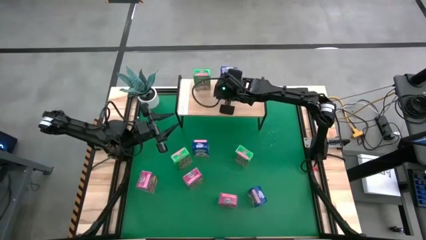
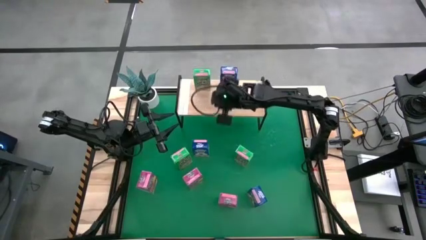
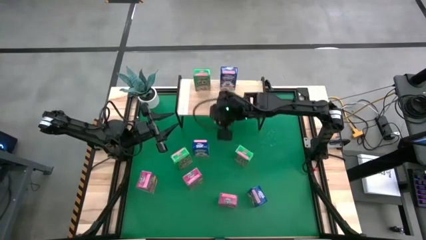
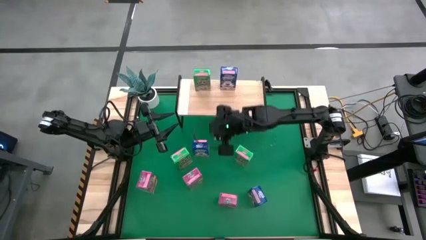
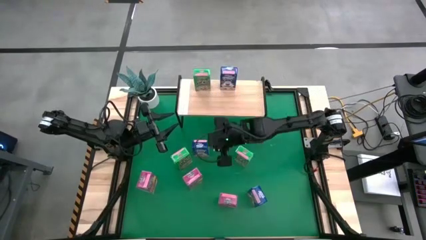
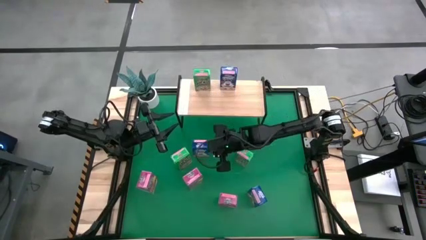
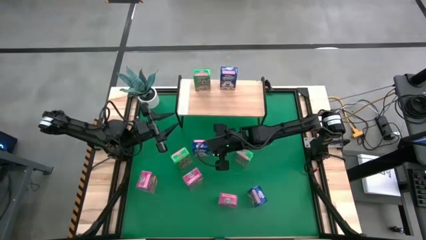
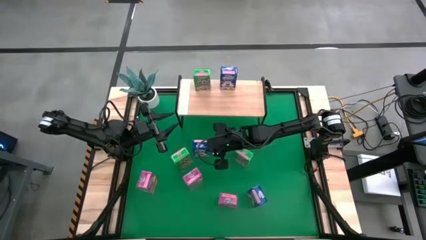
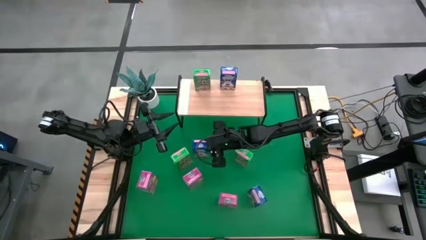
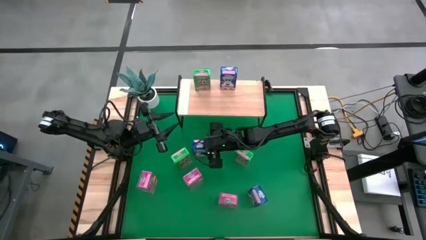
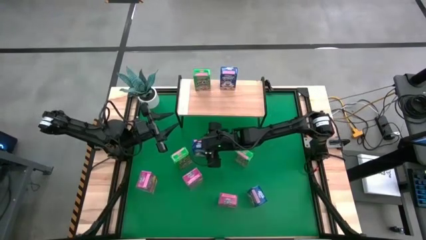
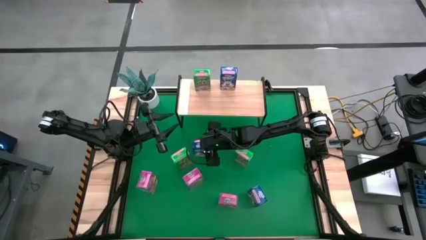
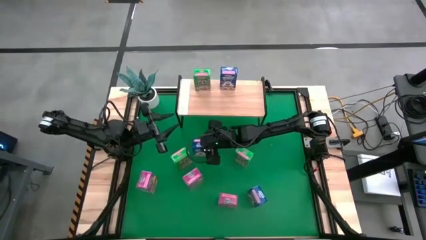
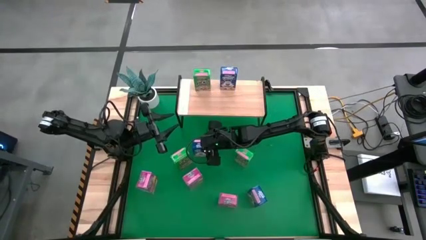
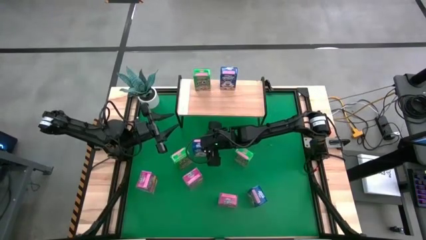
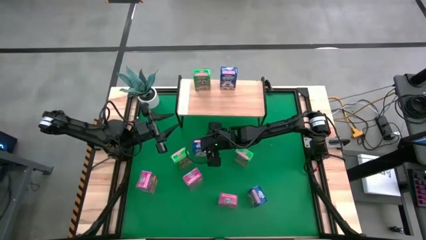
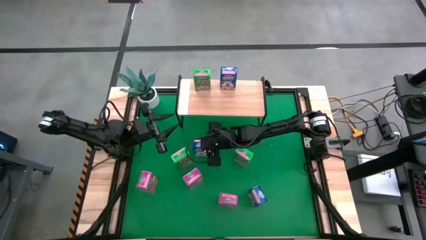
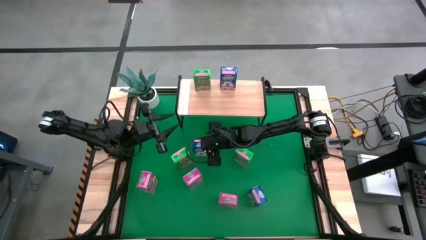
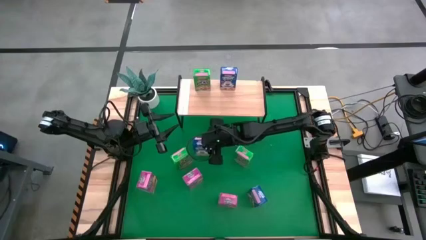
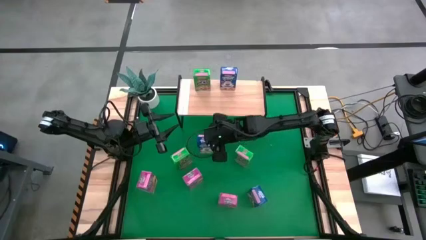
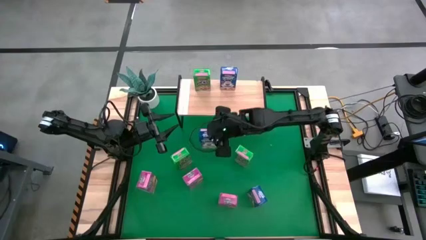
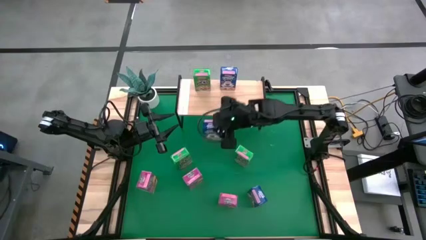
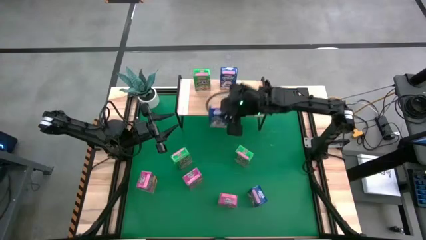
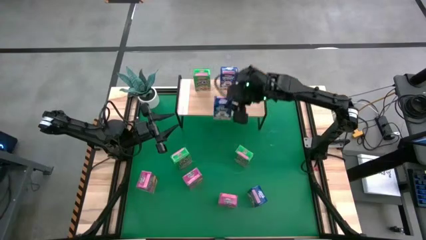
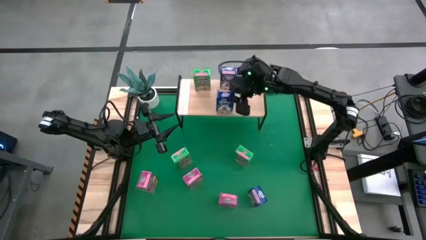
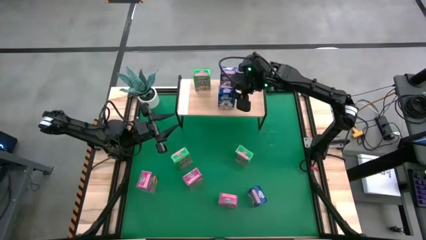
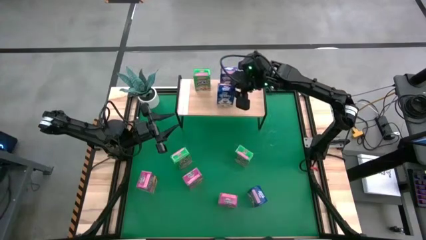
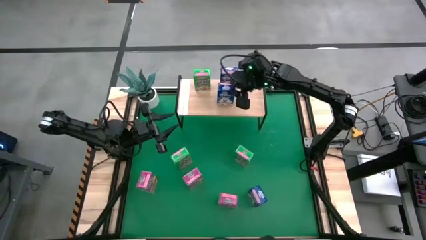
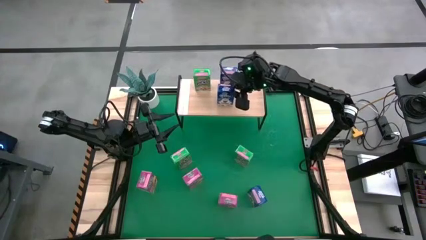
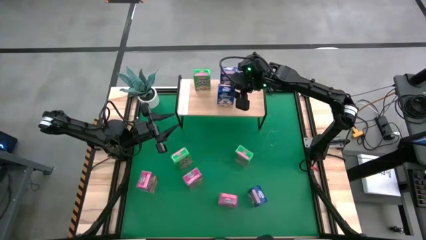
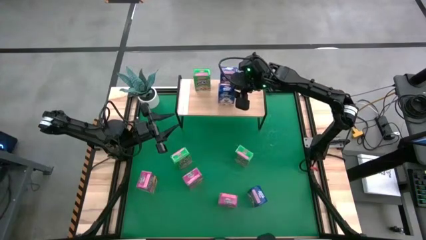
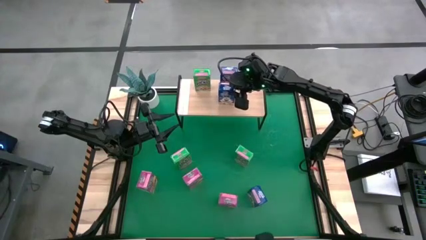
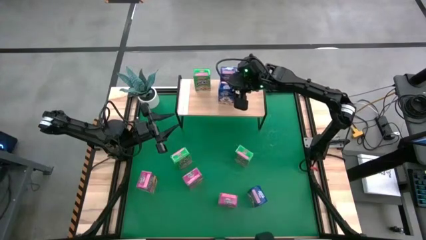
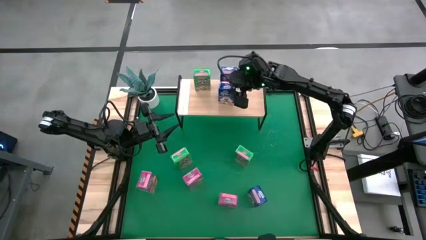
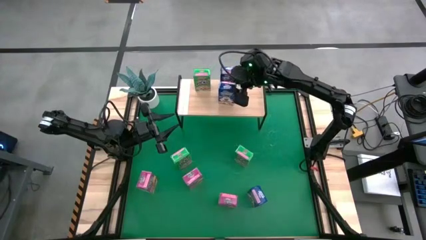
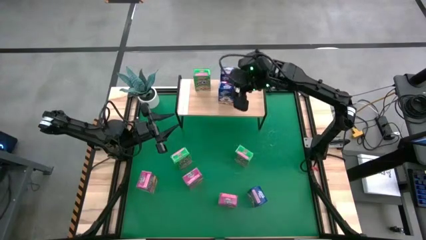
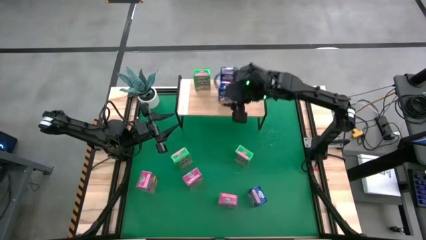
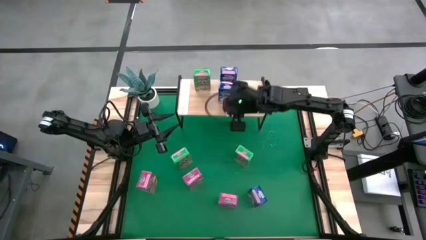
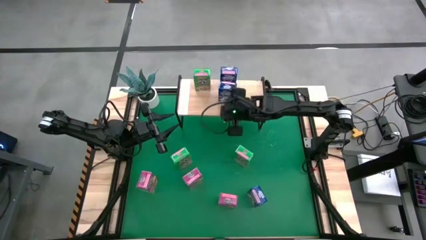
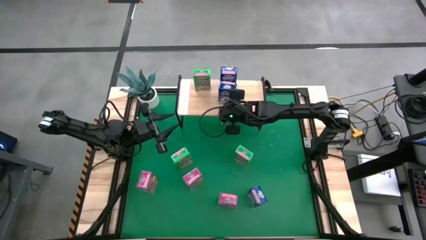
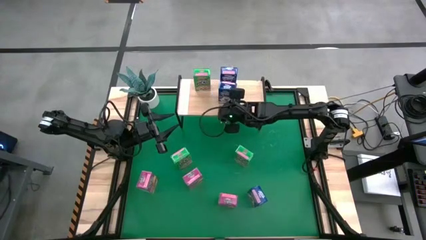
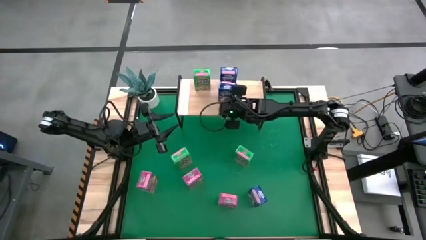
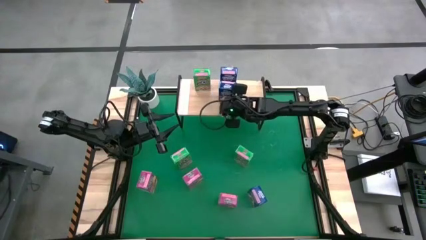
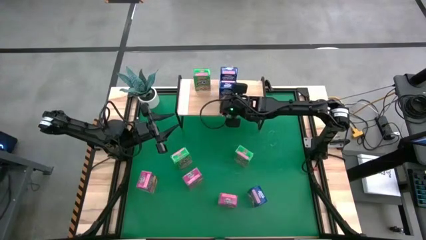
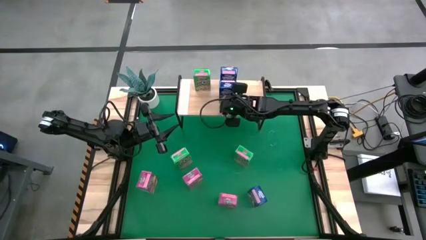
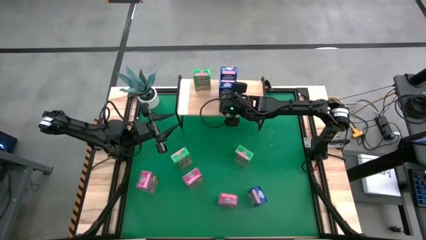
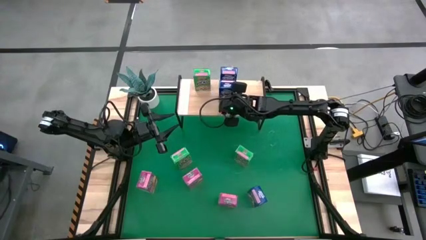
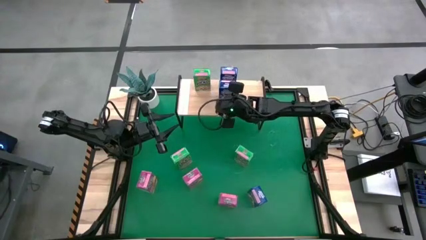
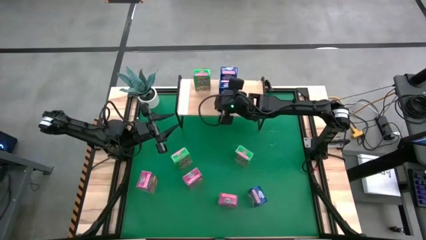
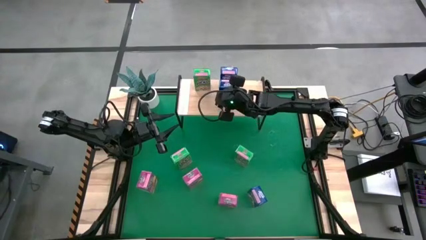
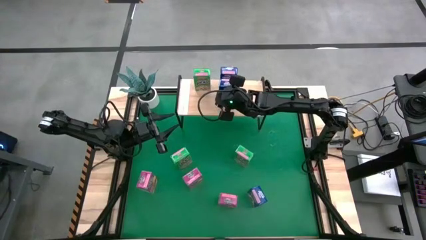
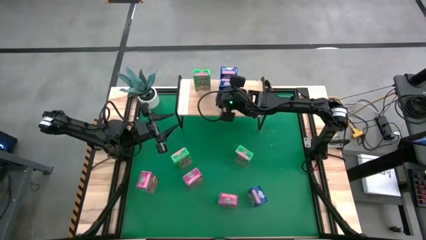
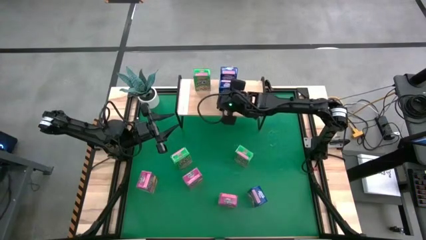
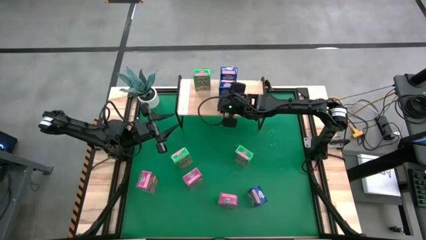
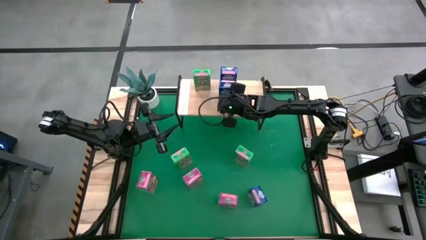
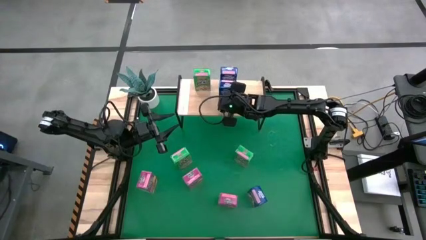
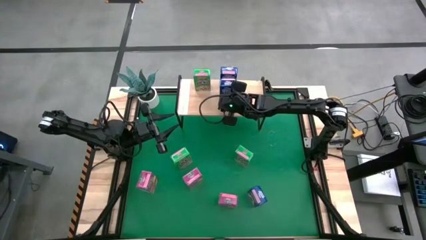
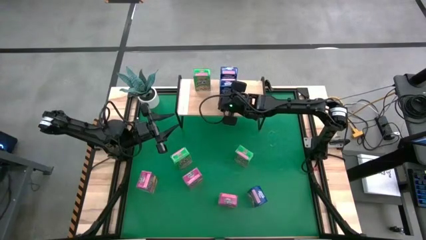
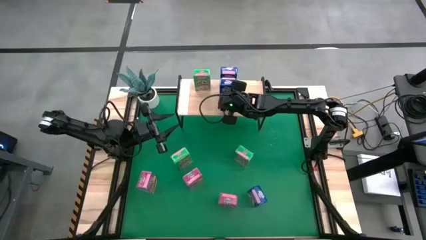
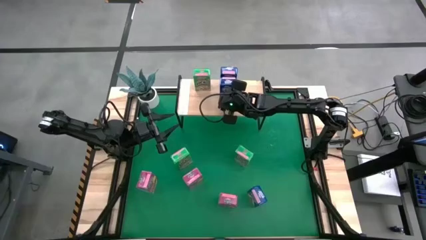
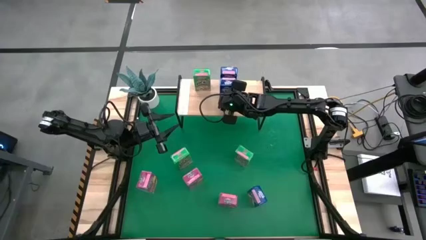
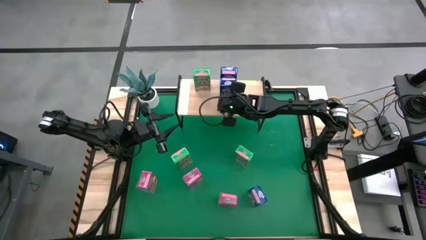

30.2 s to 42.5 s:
Task: Stack cereal on shelf
Put the top blue cereal box on the shelf aligned with the other blue cereal box
